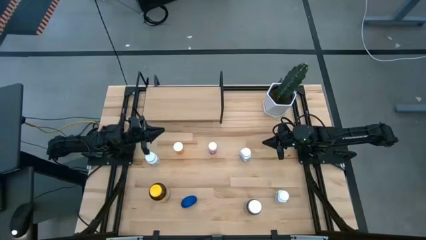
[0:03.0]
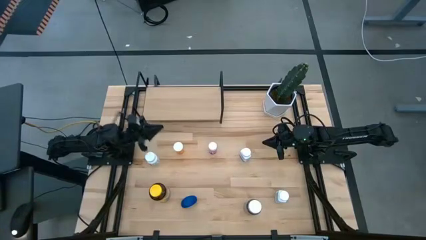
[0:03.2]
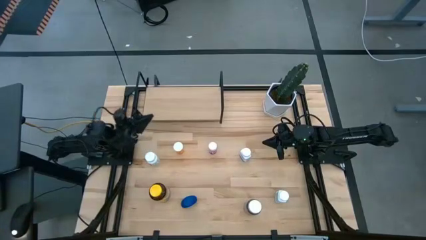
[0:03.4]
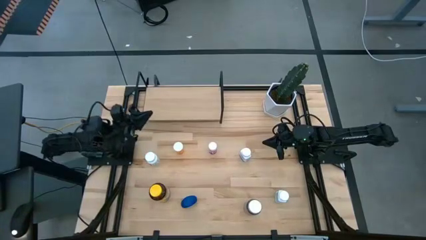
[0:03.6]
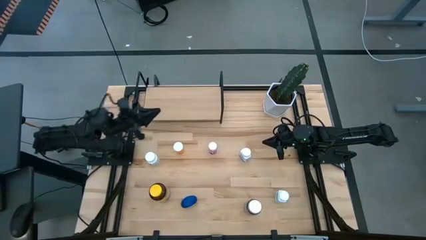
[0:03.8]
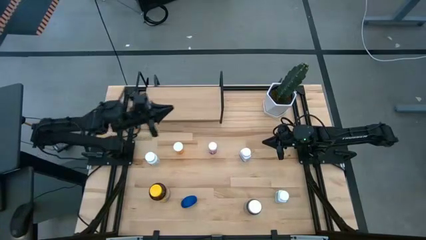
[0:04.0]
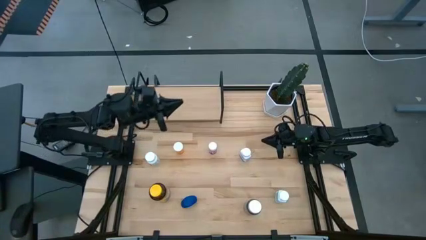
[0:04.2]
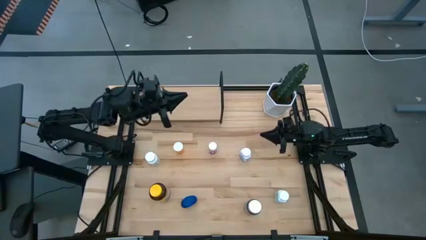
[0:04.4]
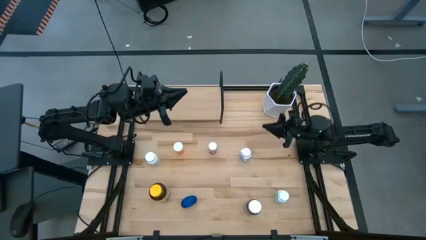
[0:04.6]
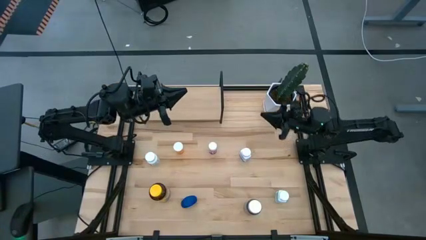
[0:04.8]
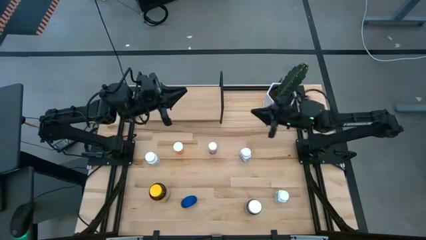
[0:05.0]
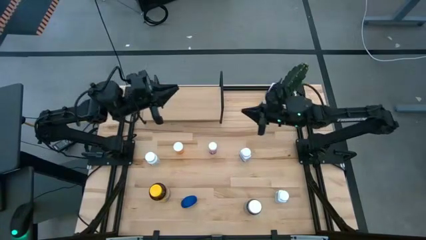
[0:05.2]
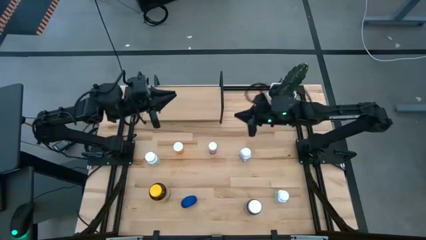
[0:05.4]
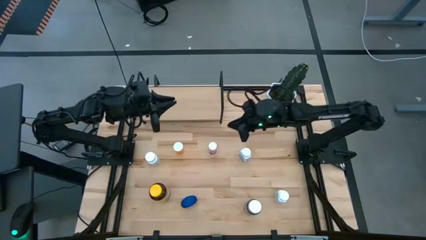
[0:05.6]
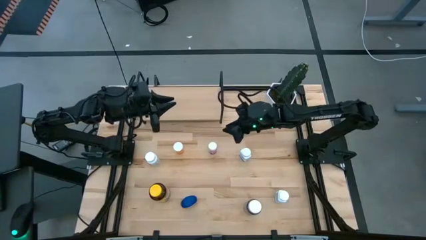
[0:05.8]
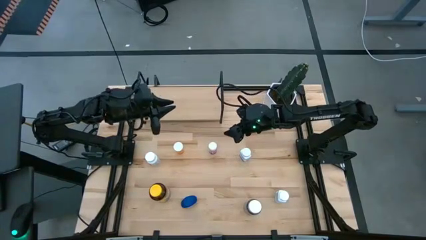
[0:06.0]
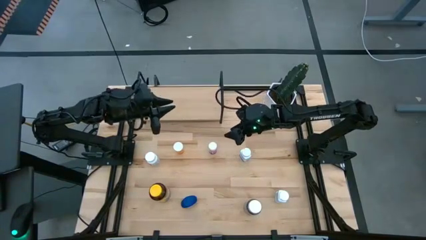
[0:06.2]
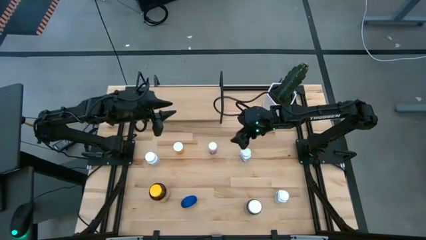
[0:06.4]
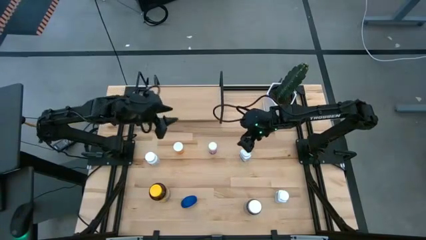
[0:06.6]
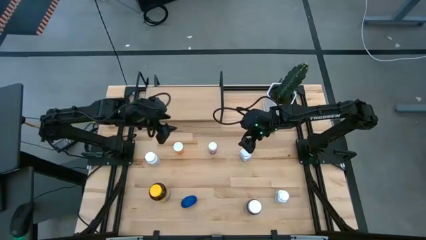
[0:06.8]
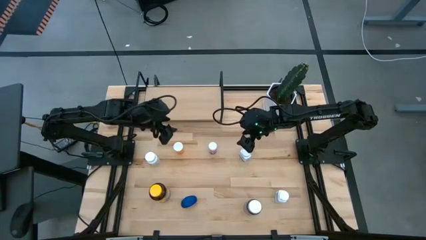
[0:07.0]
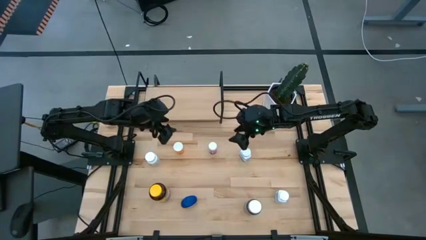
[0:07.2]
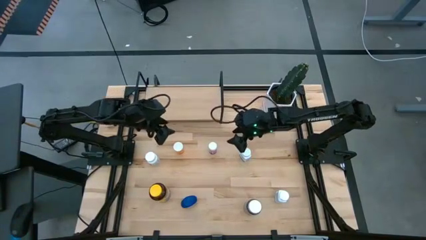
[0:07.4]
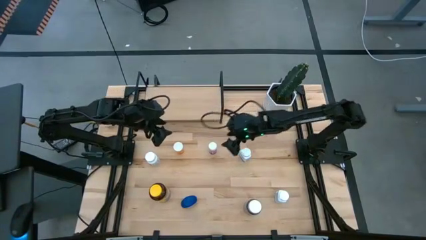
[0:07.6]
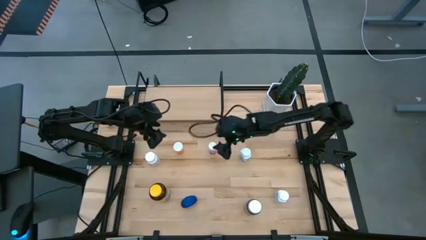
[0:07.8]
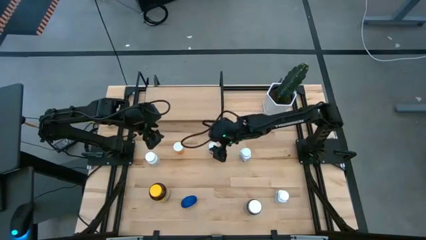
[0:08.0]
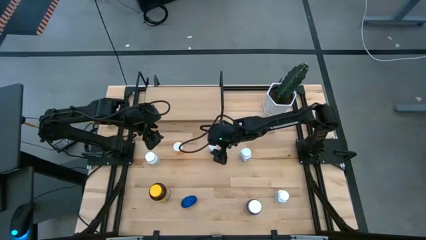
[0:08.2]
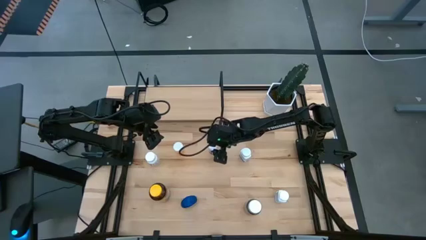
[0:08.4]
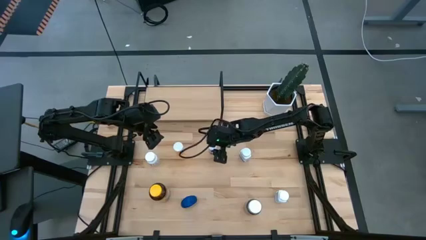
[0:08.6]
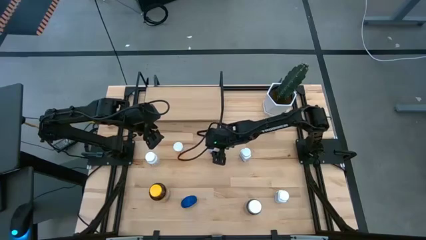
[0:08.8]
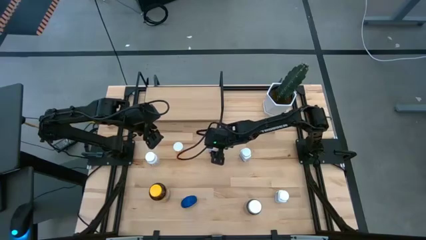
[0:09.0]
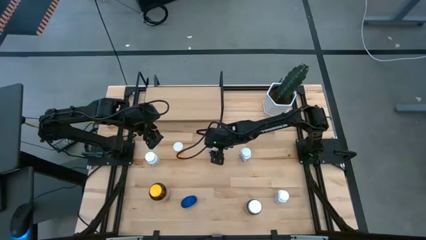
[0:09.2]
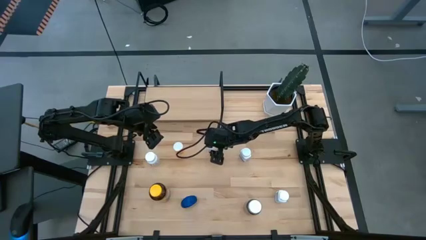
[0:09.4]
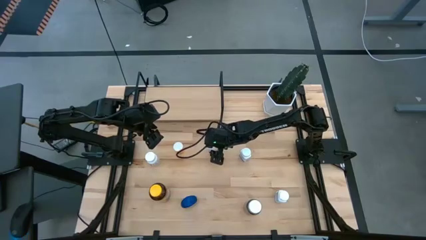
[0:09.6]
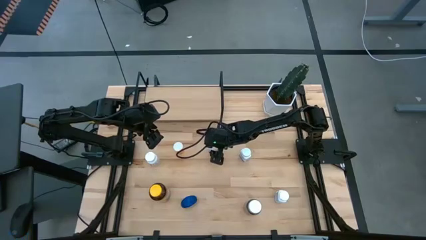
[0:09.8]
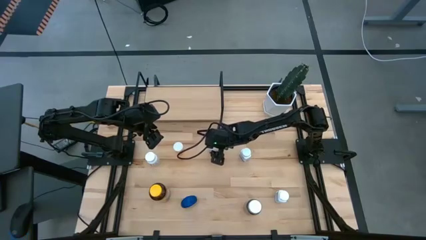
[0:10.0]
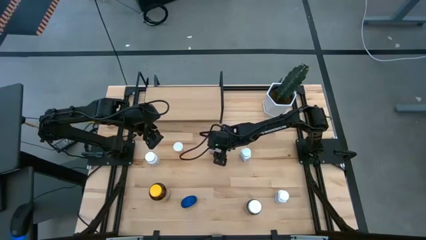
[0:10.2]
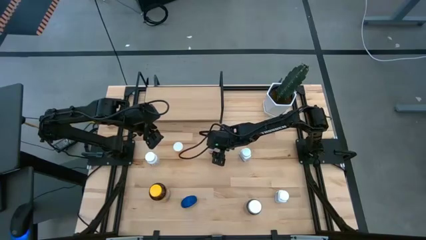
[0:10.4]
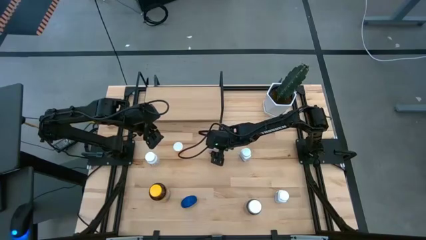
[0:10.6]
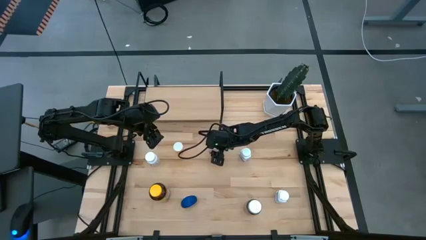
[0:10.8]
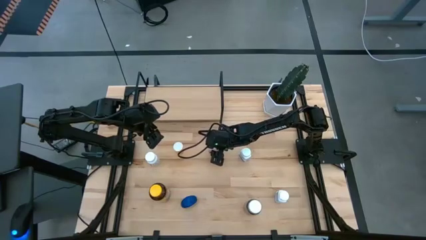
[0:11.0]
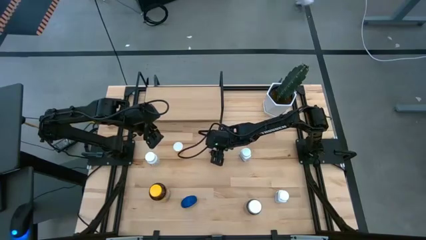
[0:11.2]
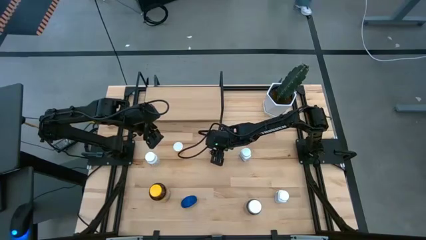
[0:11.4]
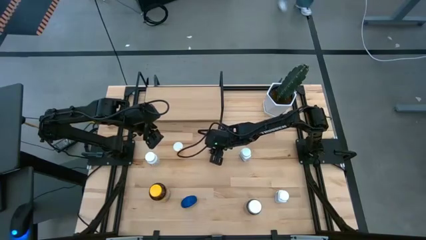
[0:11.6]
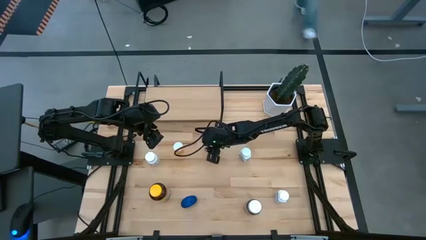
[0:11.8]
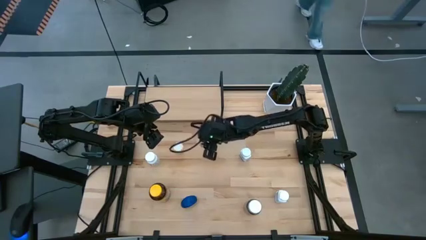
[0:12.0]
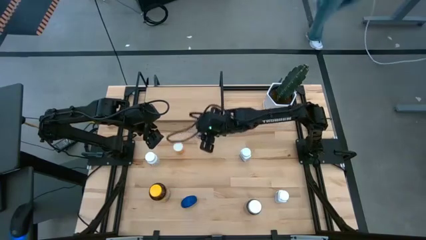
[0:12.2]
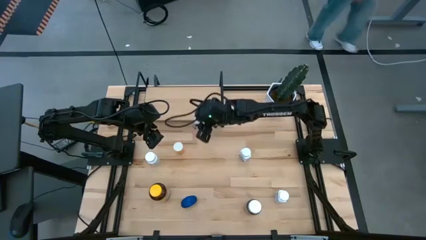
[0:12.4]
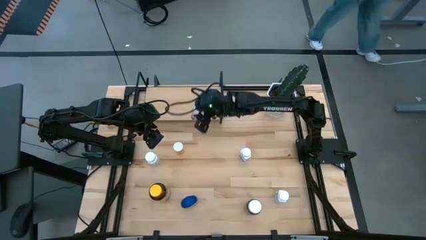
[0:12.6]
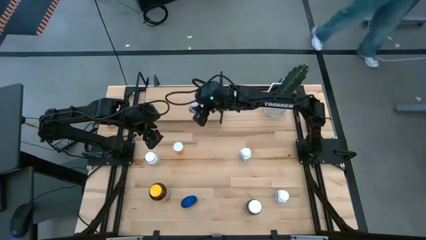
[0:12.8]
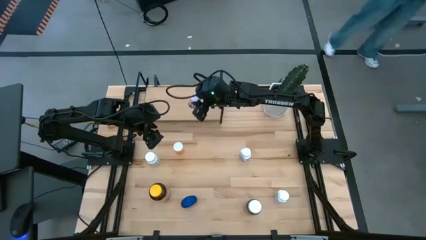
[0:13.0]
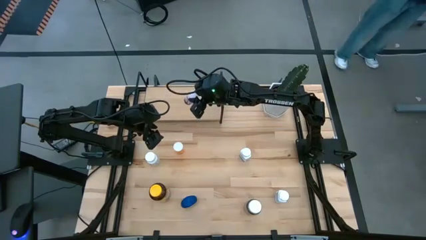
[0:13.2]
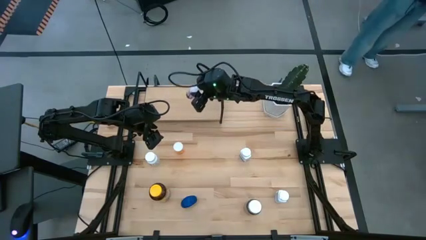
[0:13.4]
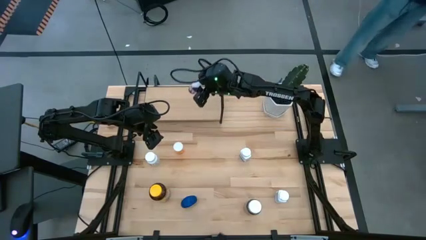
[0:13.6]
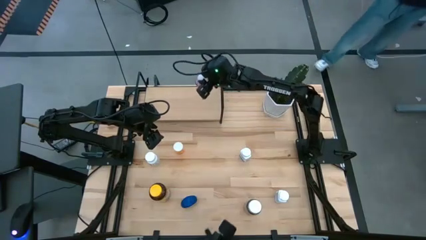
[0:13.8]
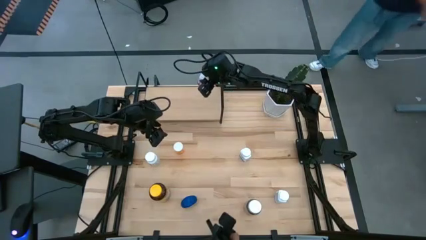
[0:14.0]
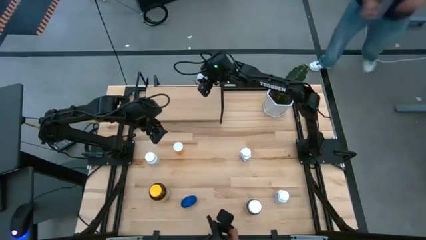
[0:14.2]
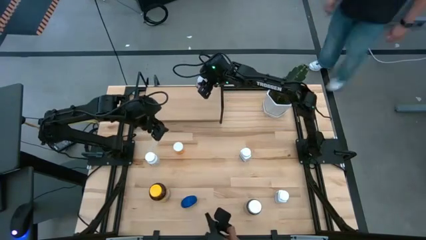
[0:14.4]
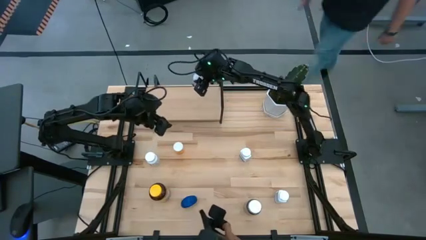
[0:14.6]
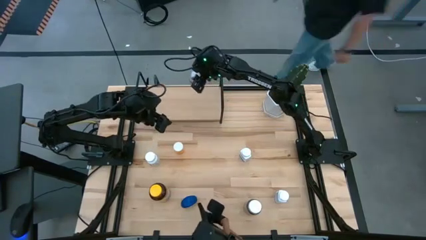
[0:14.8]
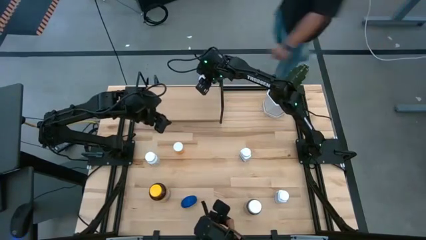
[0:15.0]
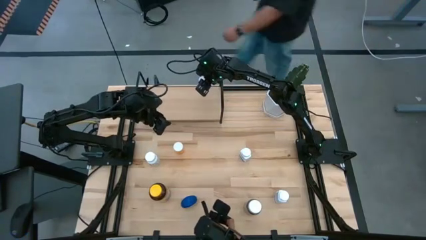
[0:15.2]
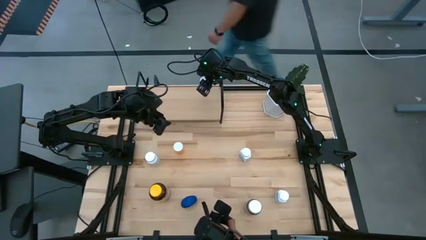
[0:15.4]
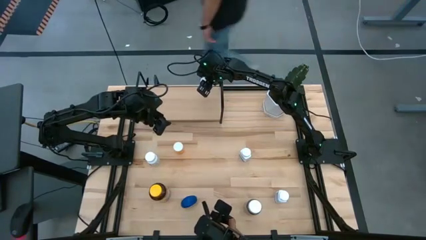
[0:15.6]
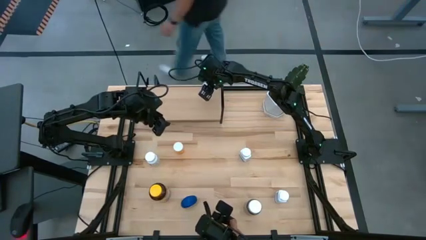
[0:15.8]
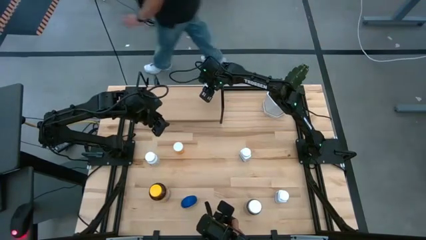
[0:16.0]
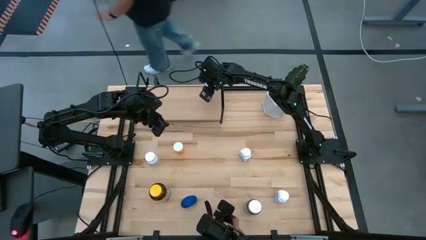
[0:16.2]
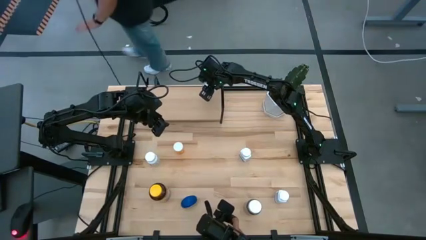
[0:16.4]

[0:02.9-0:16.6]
Task: Pick and place medicine bottles onto shelf by color
Put the pink pill bottle on the shelf

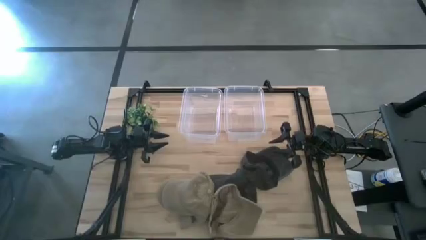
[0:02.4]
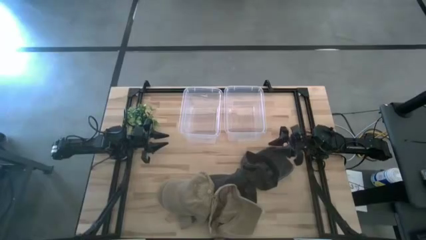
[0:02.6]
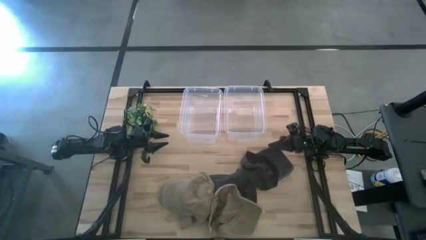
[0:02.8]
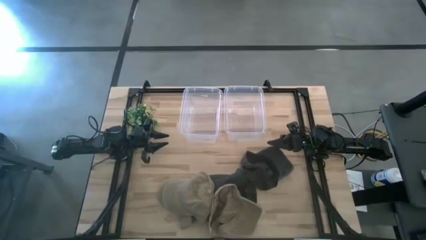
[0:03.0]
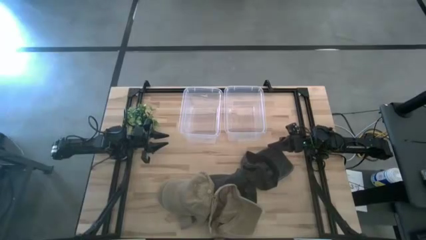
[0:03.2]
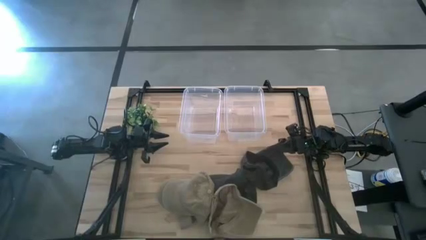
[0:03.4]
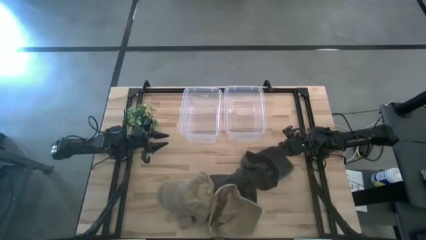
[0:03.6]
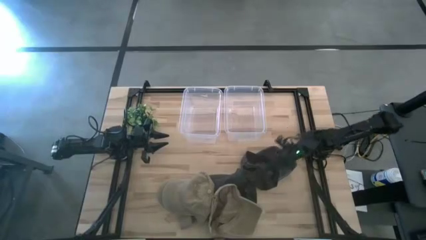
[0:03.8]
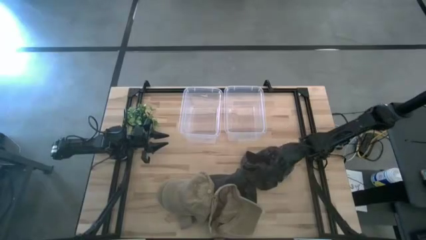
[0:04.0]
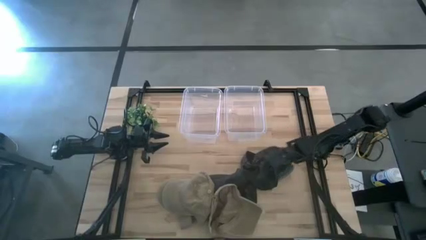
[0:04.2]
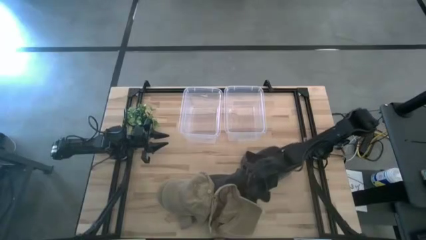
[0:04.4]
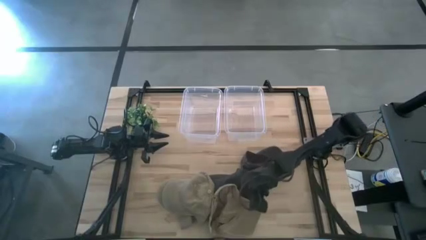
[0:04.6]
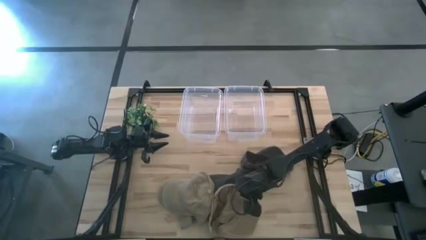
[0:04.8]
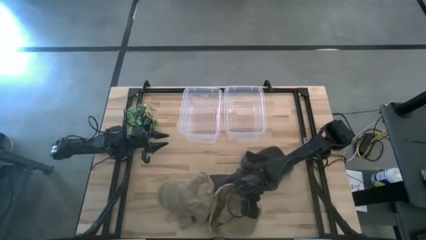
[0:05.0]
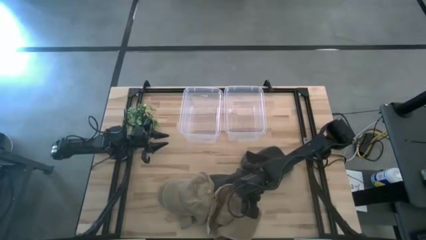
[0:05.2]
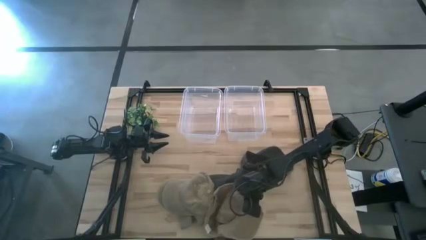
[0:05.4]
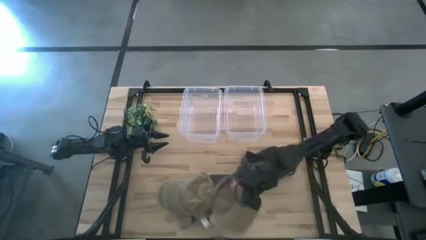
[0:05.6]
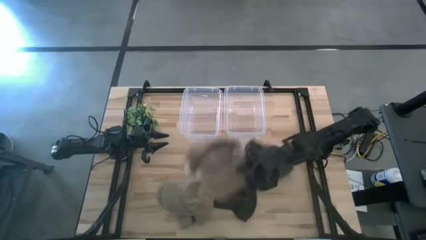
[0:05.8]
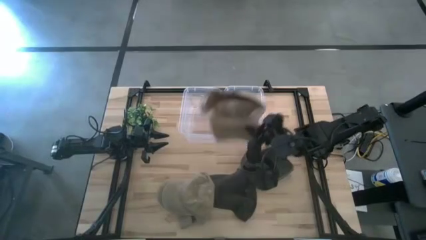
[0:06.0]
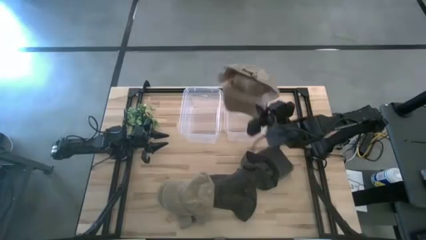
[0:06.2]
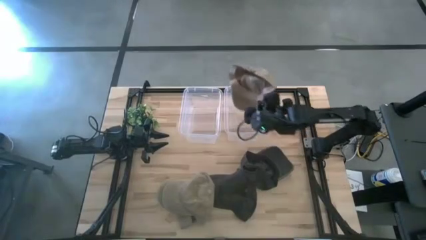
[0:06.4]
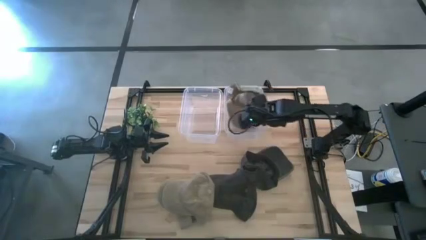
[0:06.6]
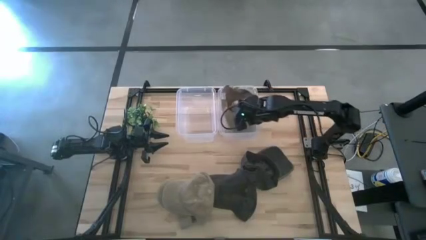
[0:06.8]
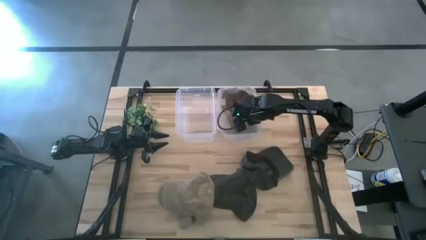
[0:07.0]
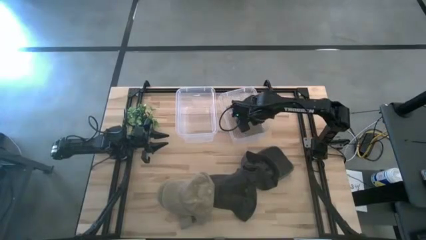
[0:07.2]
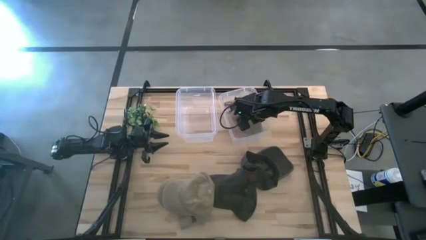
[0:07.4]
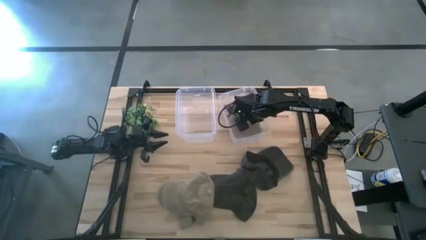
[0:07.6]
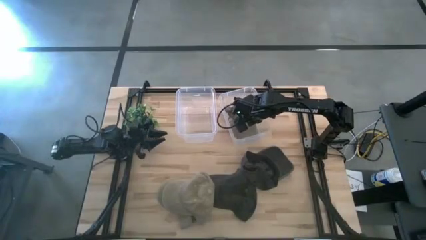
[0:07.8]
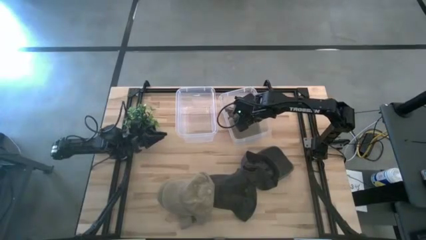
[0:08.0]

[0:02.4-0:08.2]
Task: Pick & Place hat
Put the right brown cap into the right transparent bin
